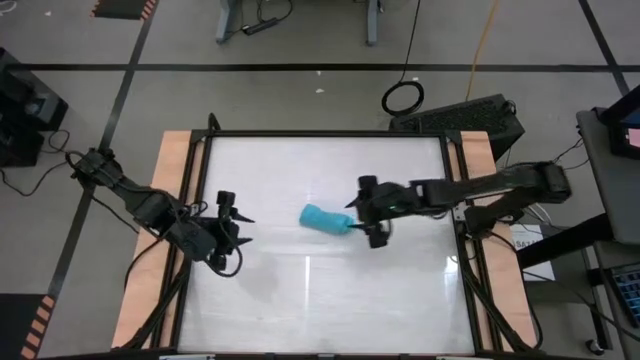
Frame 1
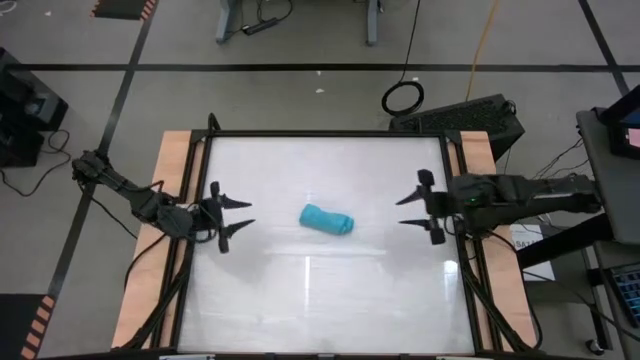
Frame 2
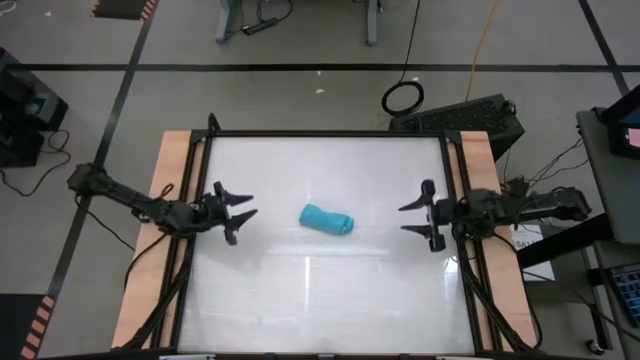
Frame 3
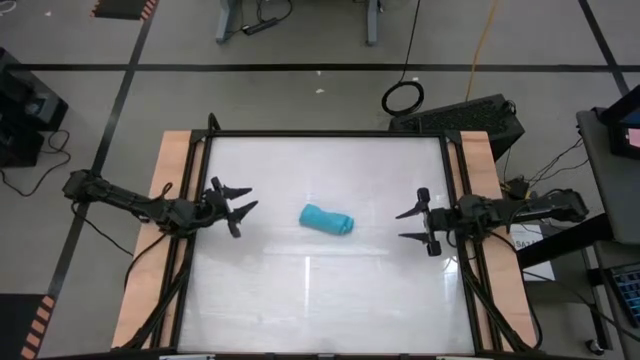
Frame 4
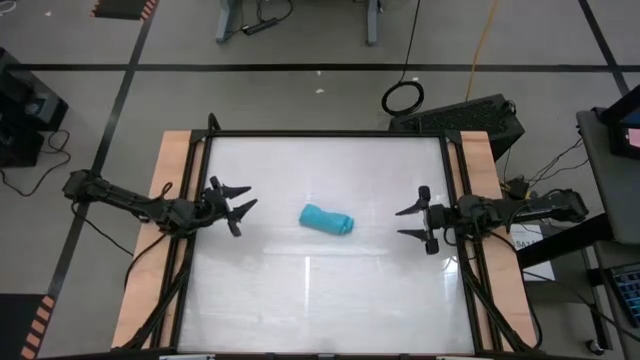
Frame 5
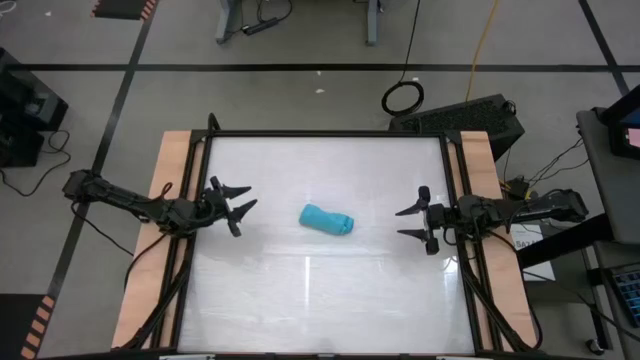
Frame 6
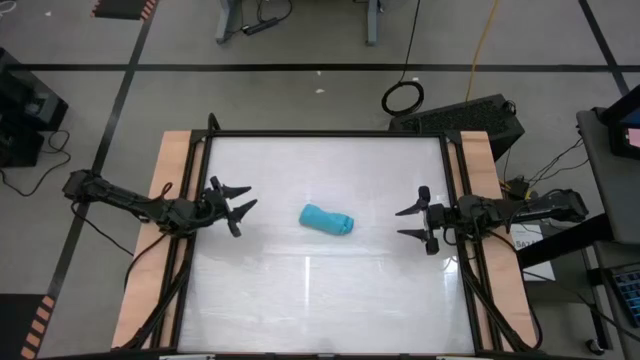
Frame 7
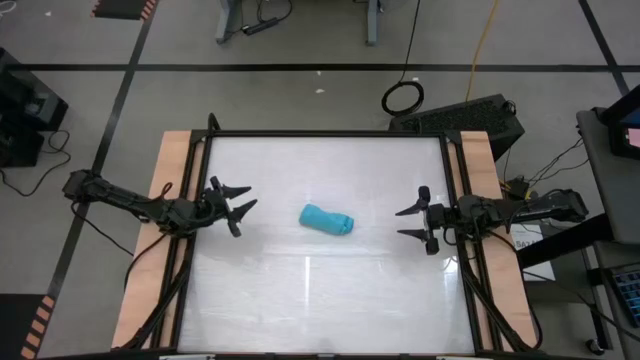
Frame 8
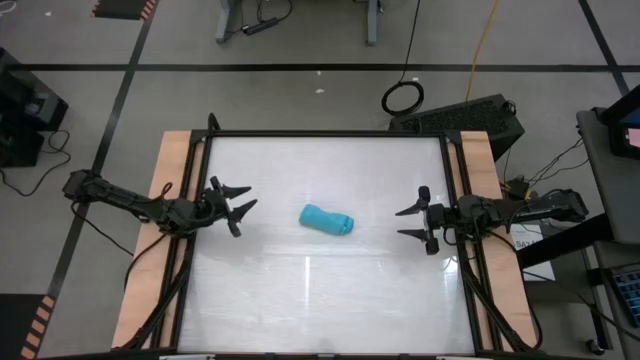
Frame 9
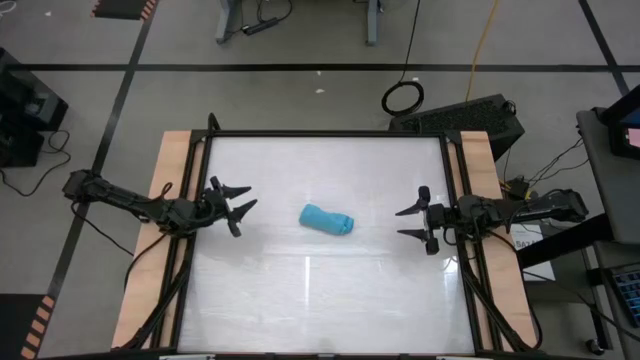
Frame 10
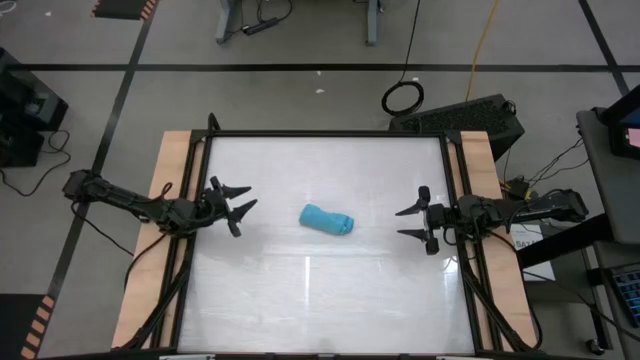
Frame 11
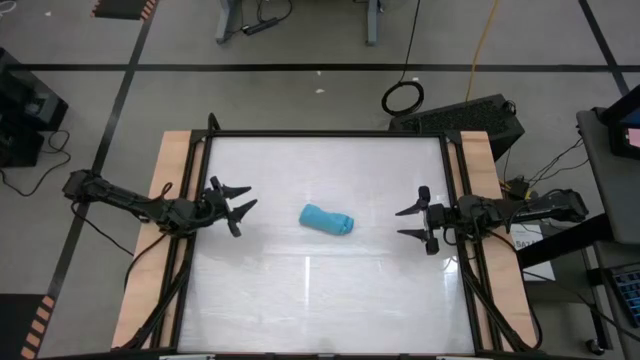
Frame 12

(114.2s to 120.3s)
Task: Roll towel into tight, uniform cylinder
Return to Home Position

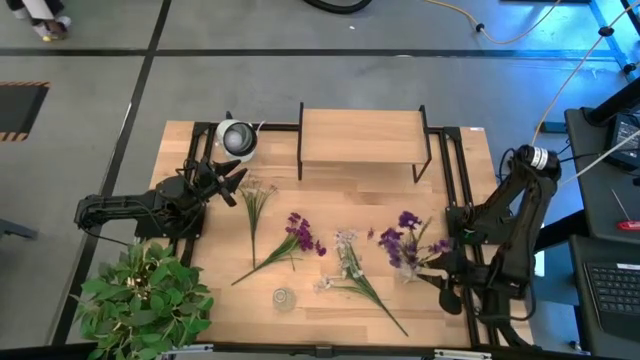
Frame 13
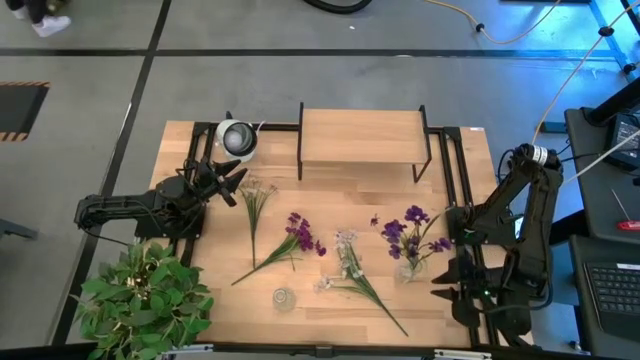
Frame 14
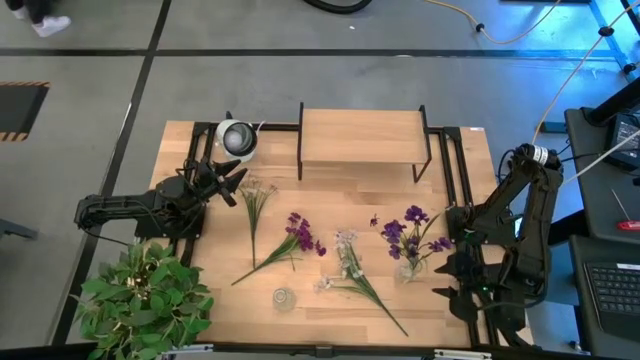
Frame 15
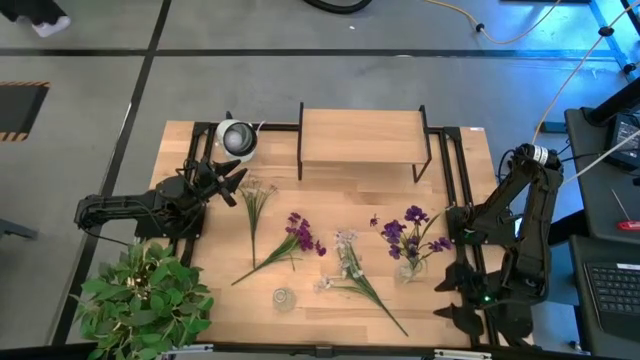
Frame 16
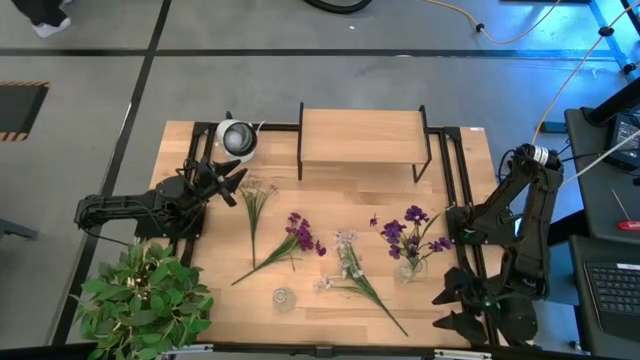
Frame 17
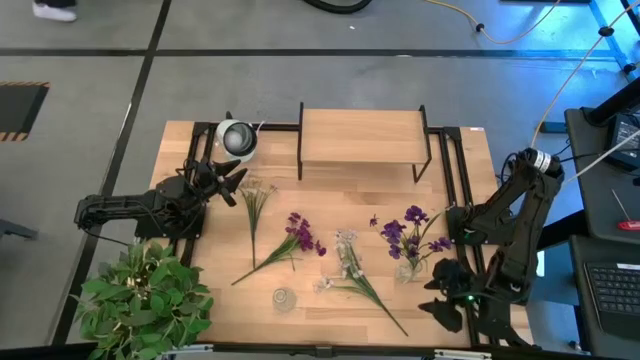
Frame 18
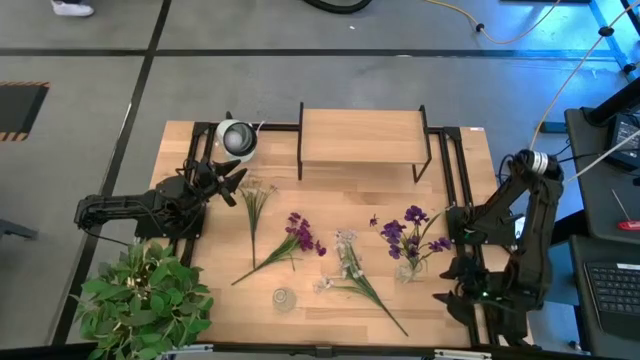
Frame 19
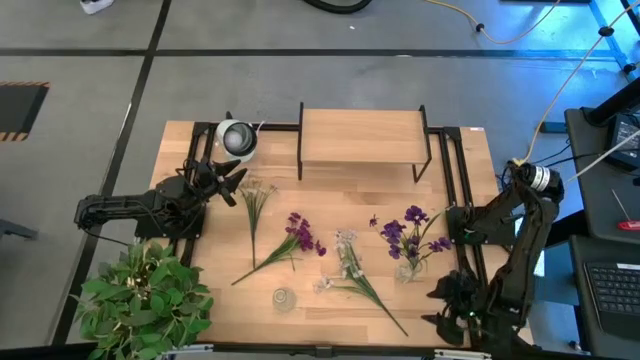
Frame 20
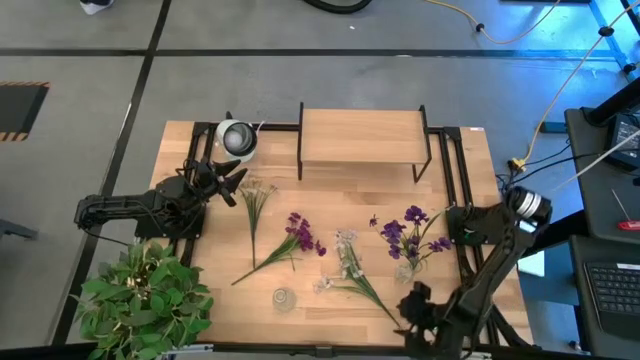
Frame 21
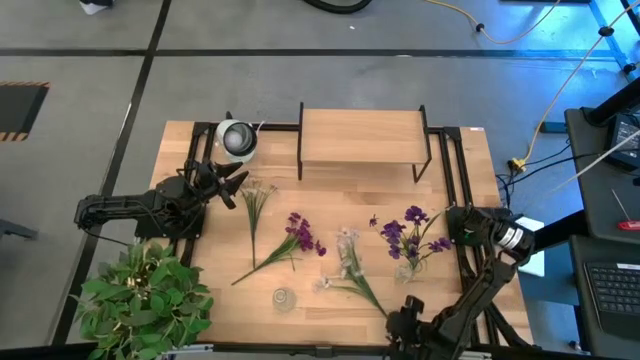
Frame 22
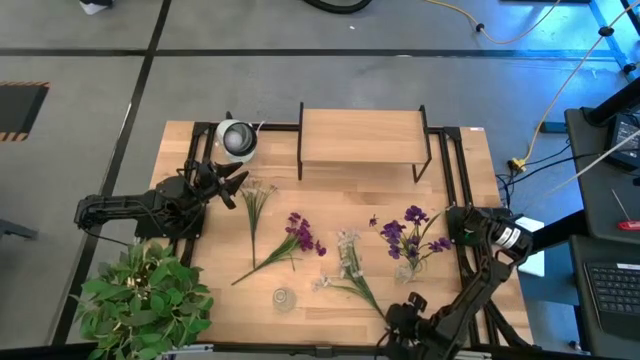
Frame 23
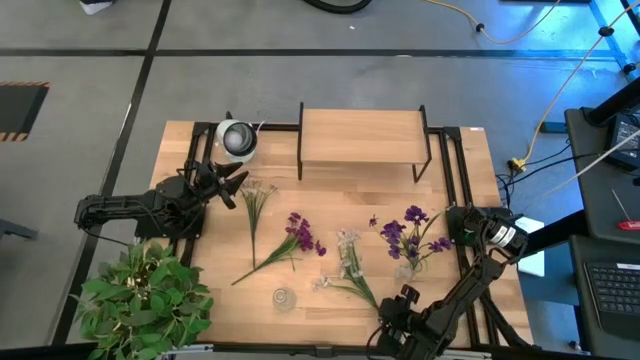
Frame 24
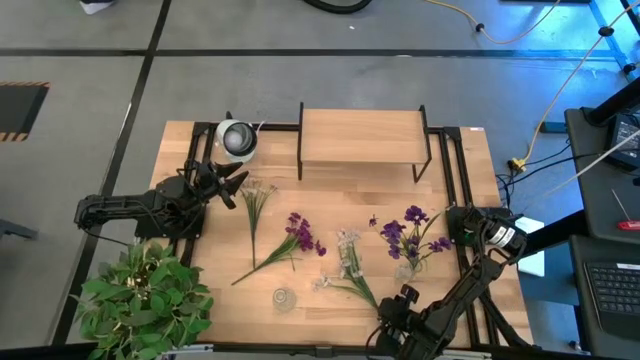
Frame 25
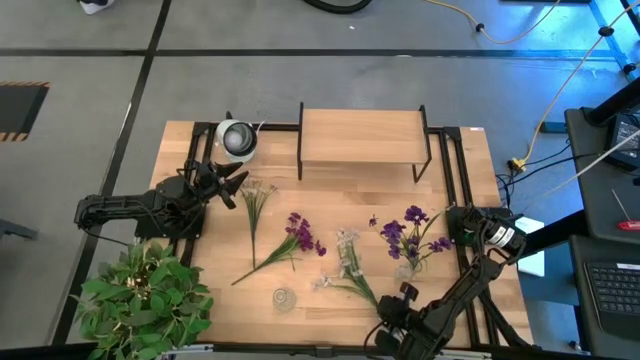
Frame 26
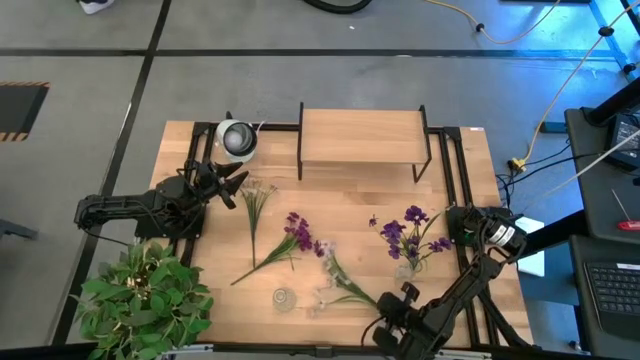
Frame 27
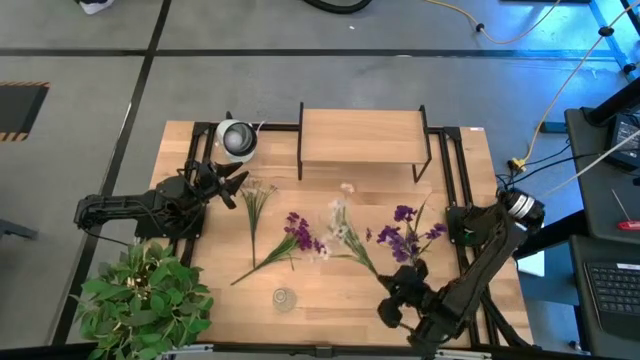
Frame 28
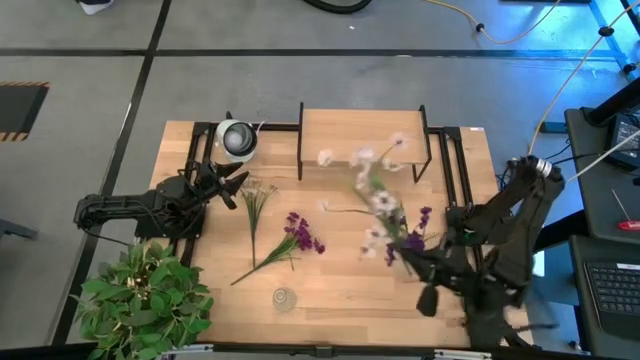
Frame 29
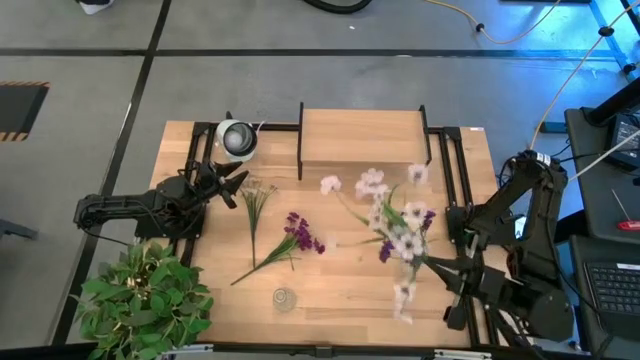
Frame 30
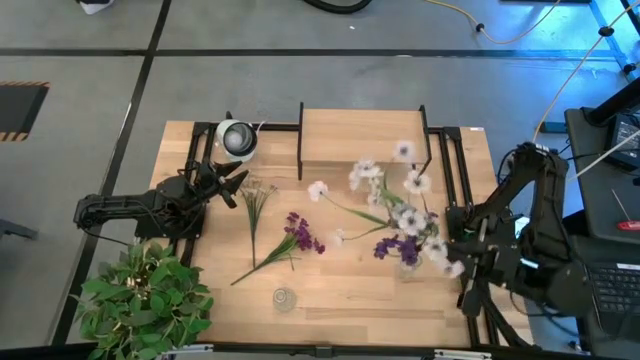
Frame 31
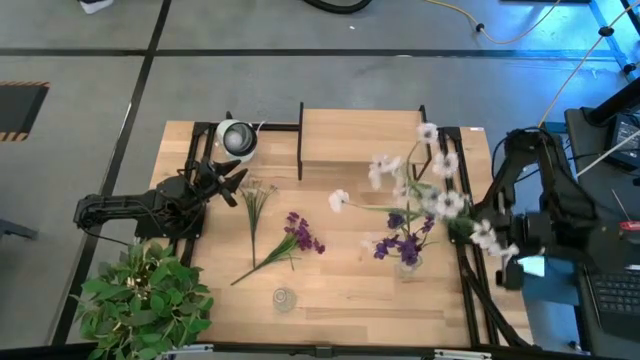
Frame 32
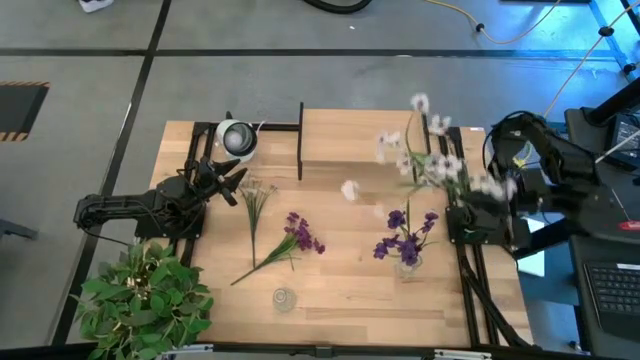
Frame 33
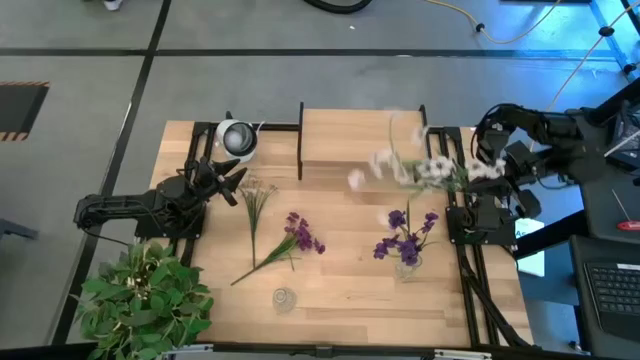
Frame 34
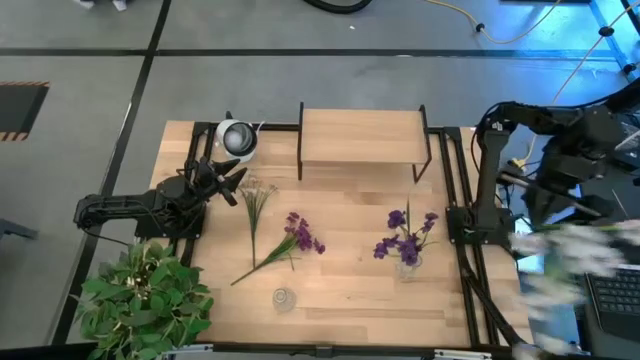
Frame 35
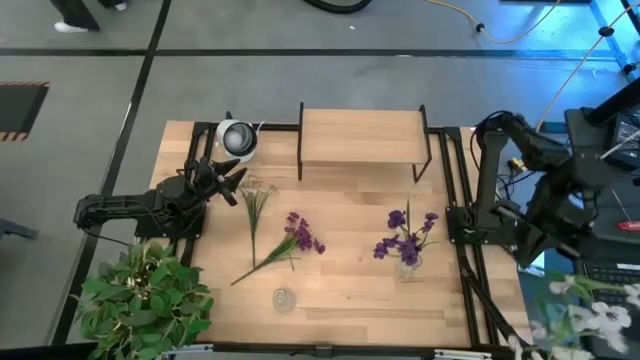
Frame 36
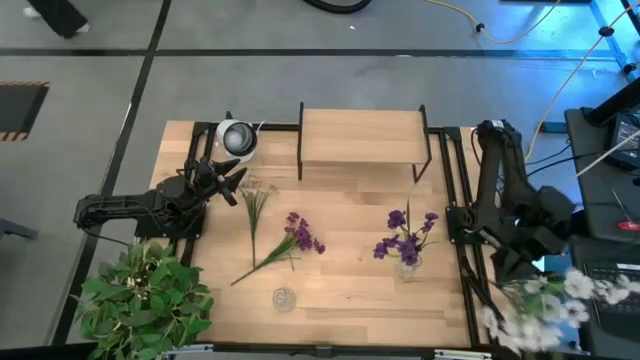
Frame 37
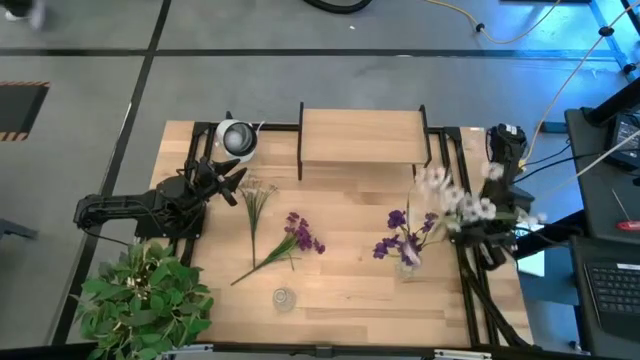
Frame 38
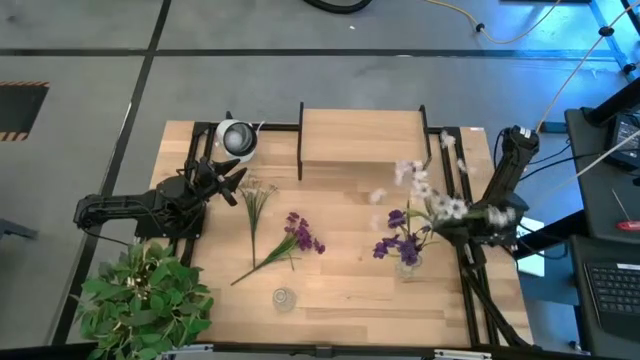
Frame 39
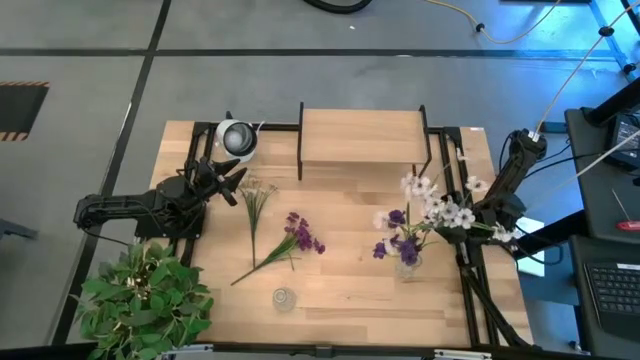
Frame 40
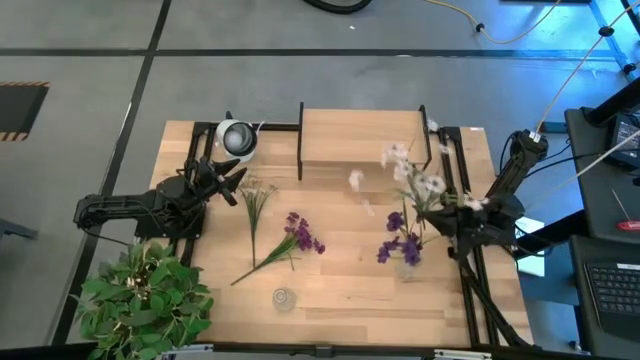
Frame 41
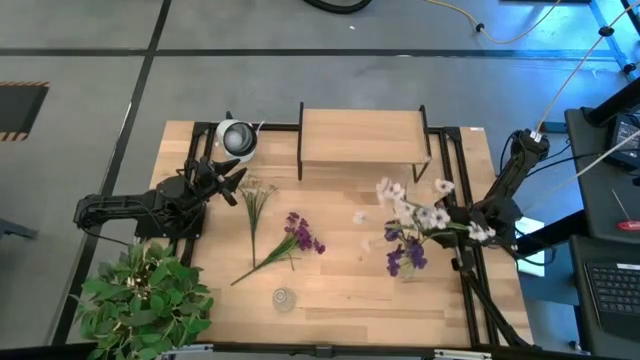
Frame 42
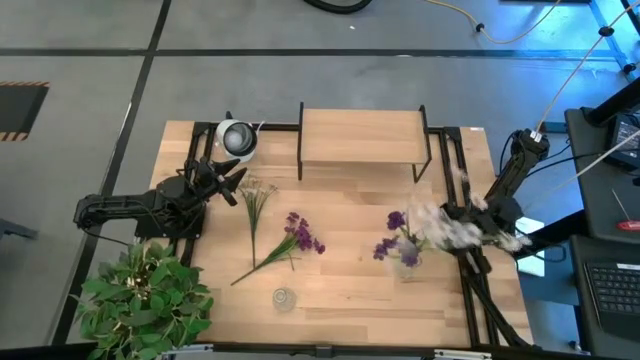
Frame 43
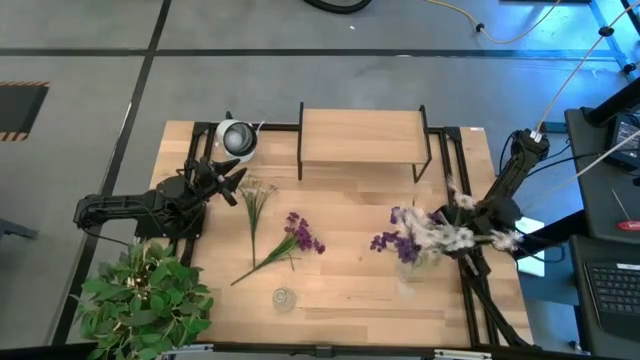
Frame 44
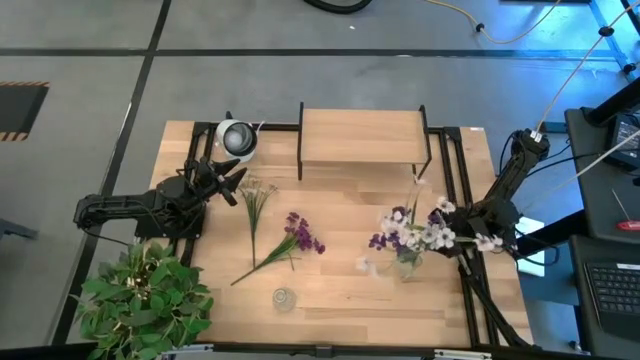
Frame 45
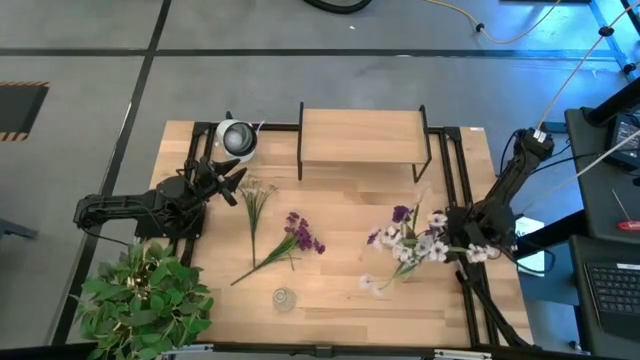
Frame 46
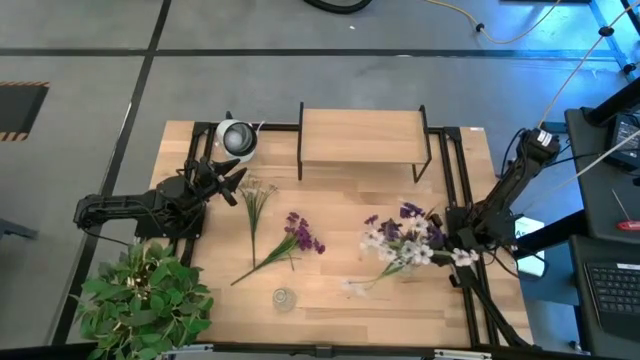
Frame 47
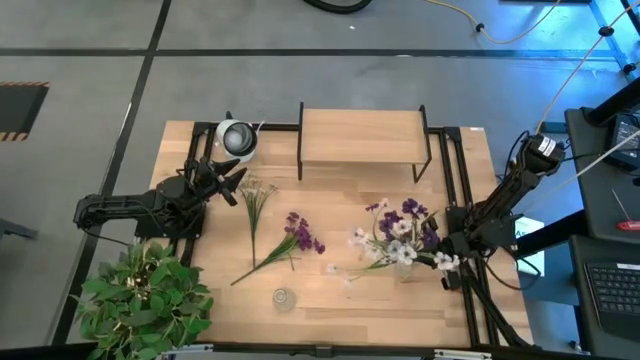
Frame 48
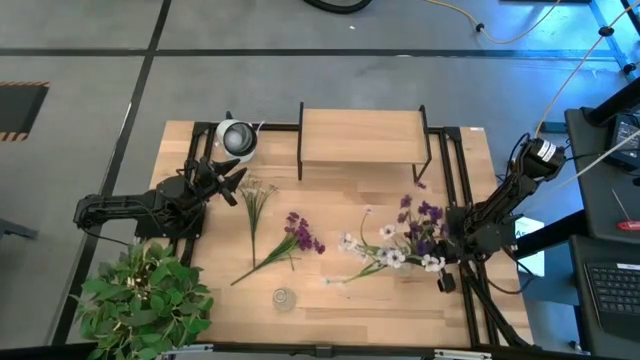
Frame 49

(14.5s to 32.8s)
Task: Pick and place flowers into a vace then onto a shelf
Put the bottom white flowers into the right transparent vase
